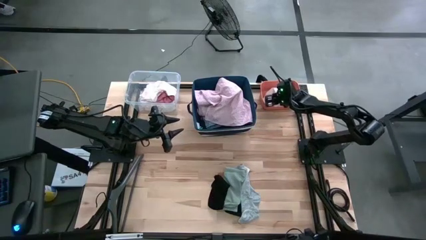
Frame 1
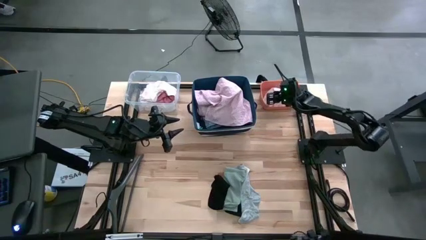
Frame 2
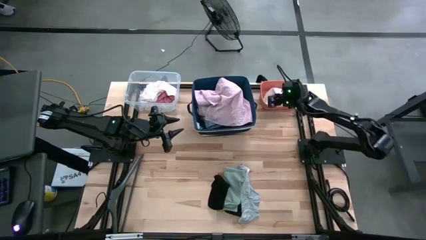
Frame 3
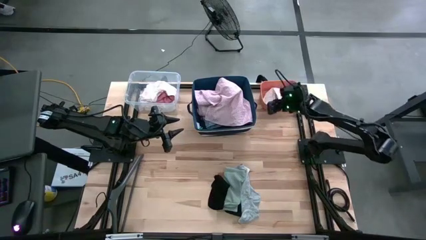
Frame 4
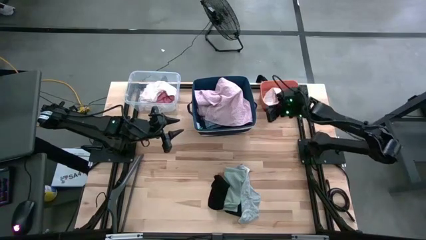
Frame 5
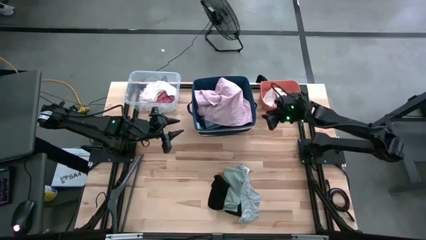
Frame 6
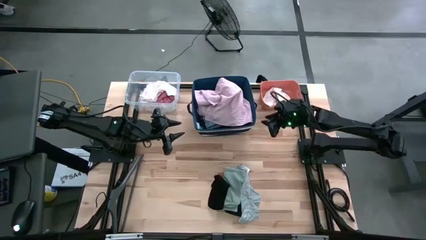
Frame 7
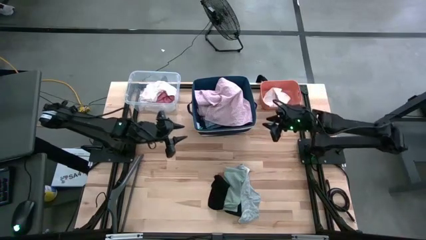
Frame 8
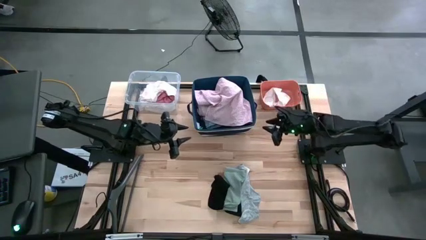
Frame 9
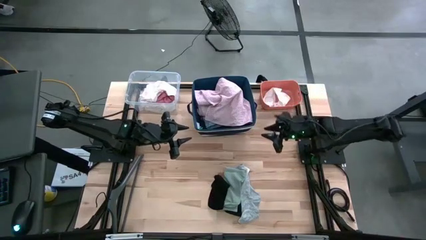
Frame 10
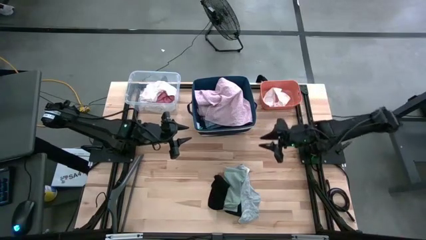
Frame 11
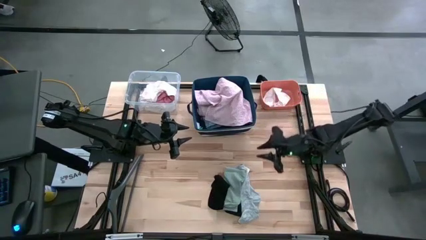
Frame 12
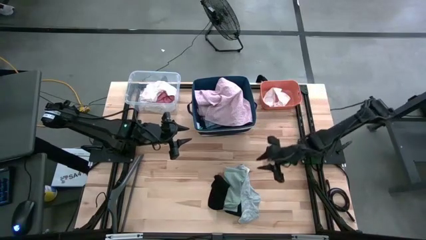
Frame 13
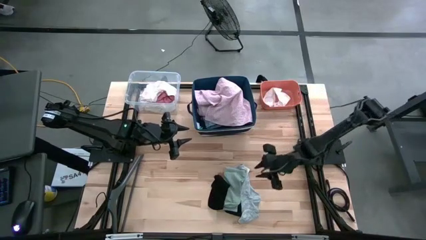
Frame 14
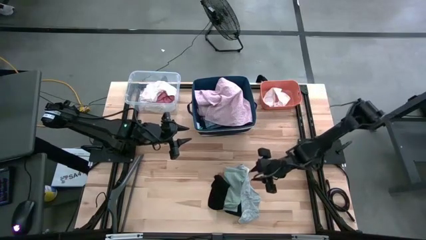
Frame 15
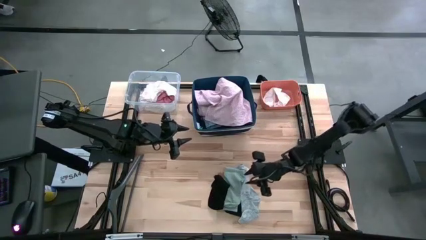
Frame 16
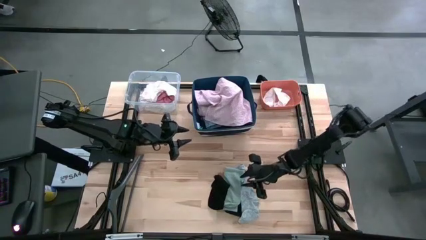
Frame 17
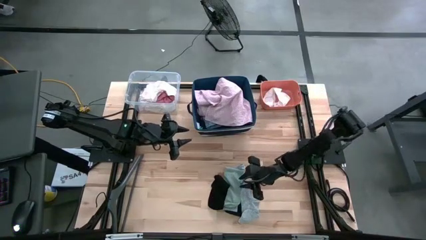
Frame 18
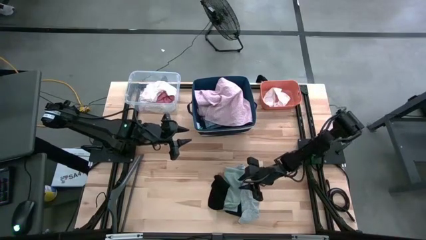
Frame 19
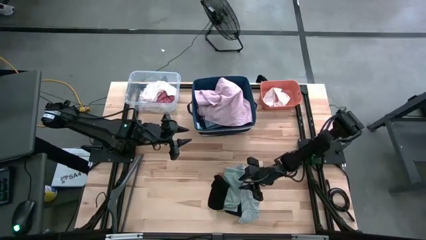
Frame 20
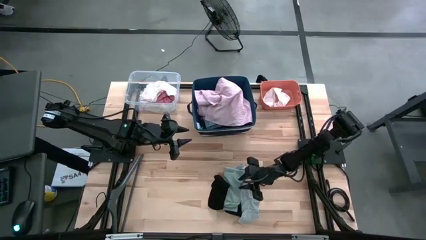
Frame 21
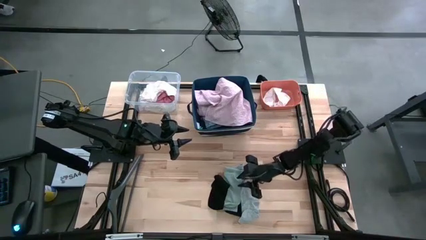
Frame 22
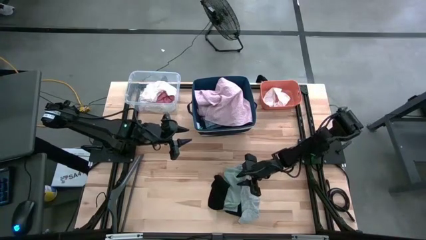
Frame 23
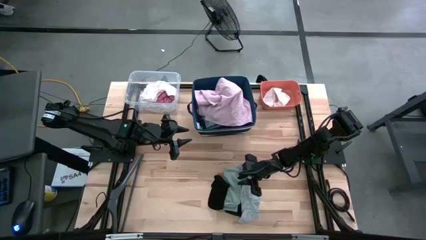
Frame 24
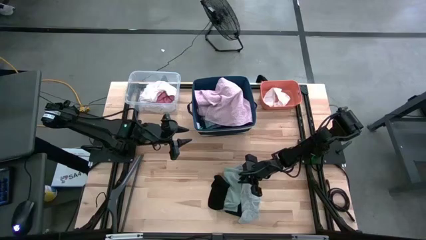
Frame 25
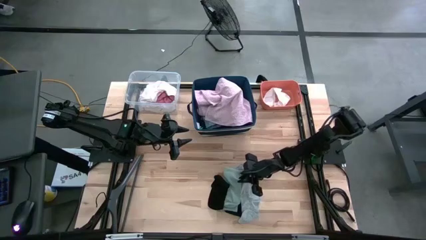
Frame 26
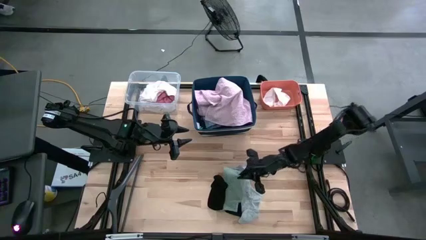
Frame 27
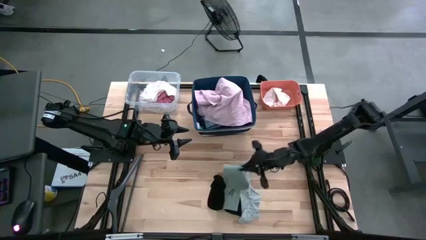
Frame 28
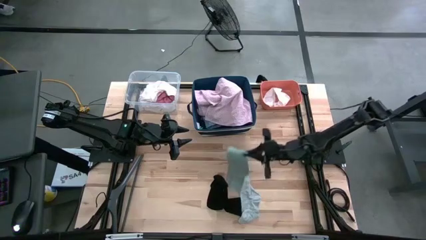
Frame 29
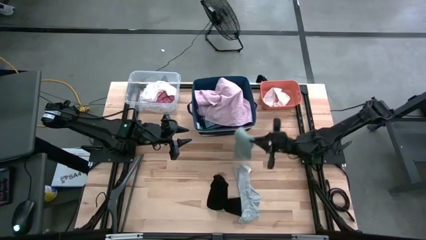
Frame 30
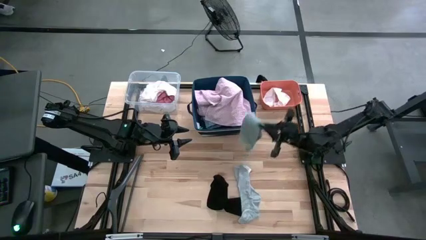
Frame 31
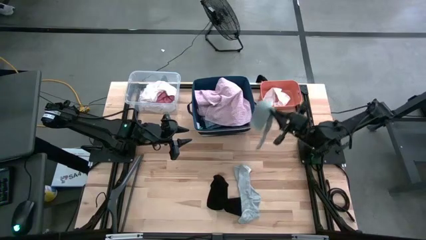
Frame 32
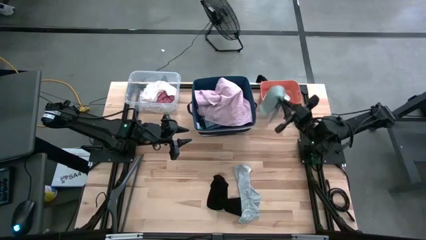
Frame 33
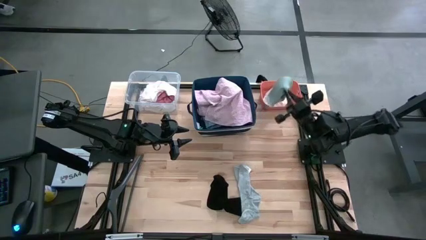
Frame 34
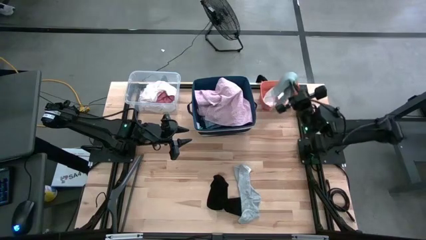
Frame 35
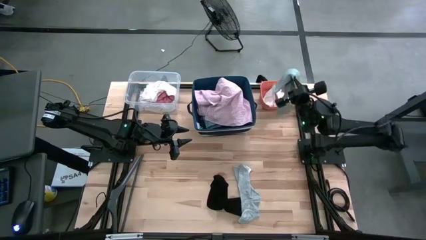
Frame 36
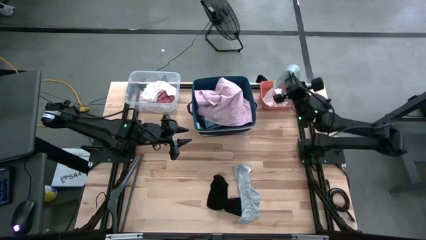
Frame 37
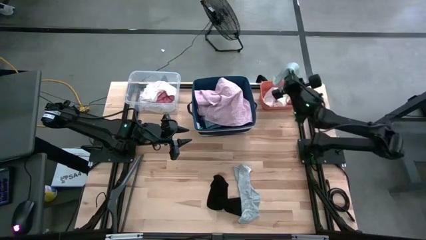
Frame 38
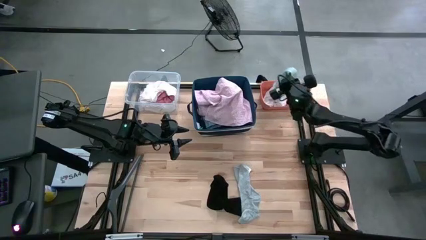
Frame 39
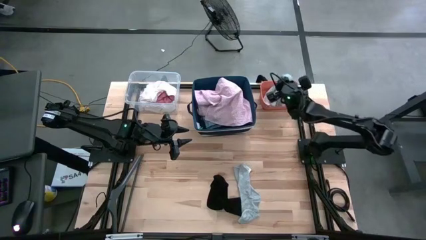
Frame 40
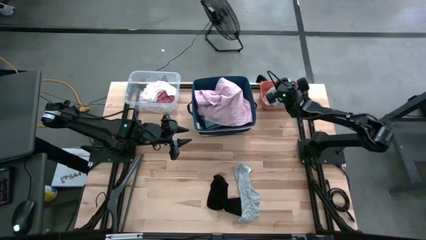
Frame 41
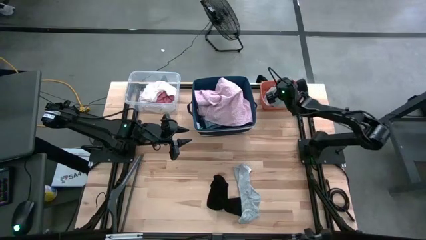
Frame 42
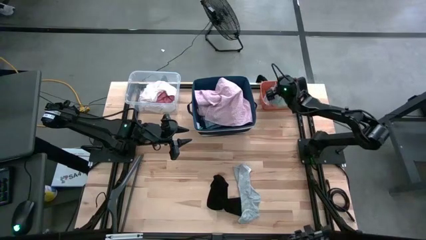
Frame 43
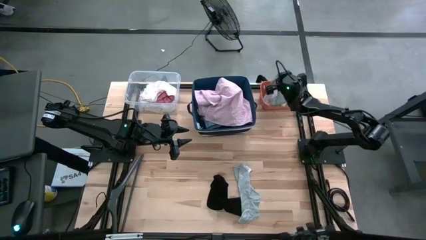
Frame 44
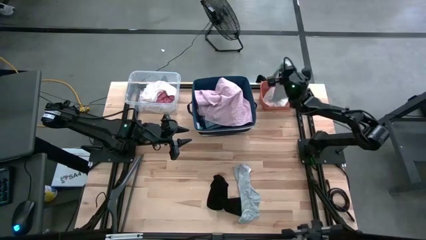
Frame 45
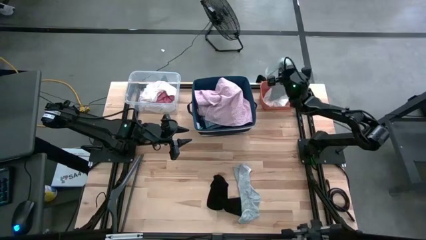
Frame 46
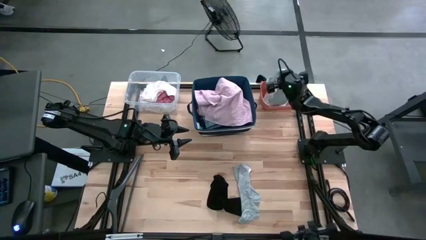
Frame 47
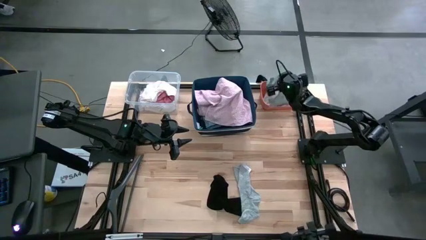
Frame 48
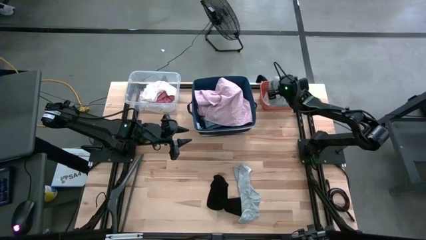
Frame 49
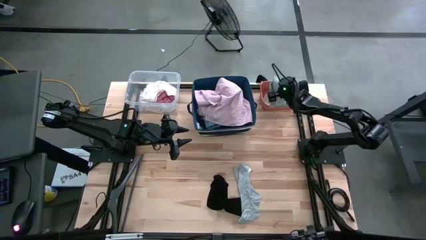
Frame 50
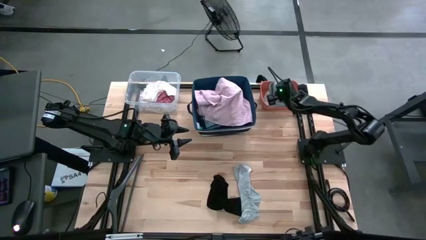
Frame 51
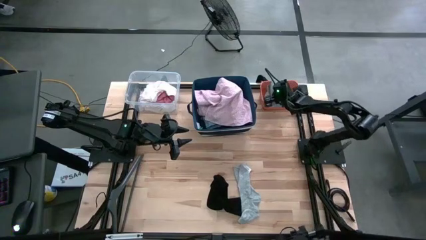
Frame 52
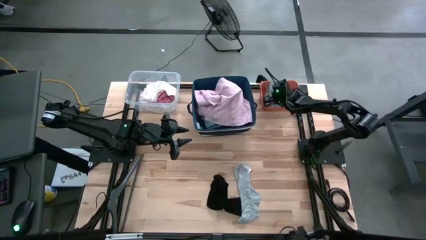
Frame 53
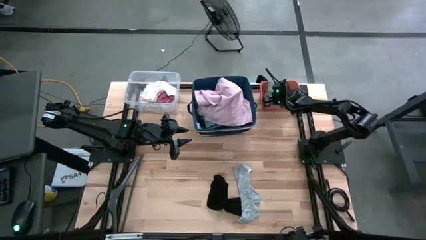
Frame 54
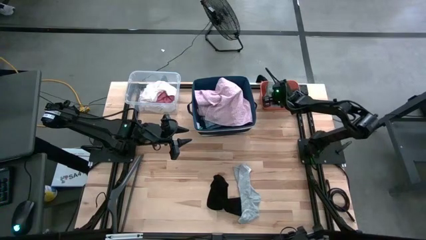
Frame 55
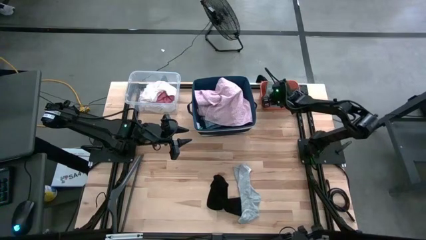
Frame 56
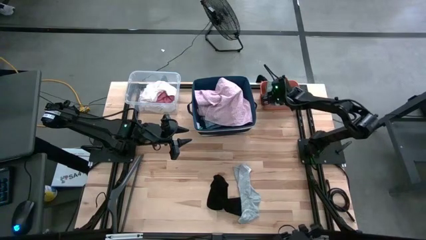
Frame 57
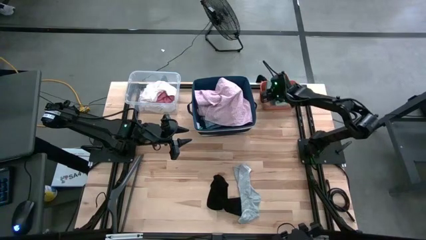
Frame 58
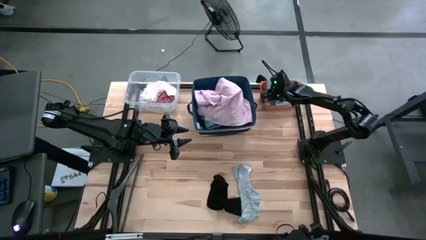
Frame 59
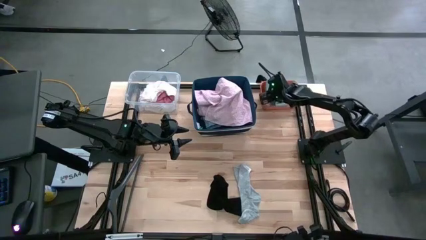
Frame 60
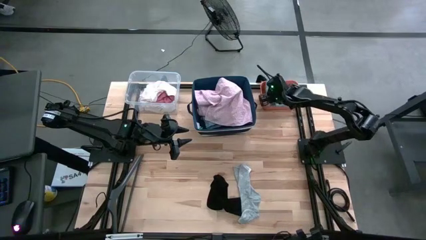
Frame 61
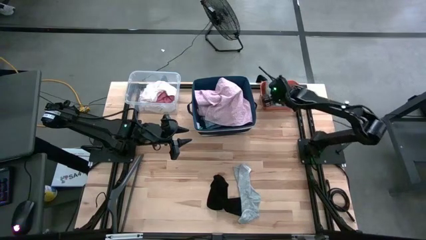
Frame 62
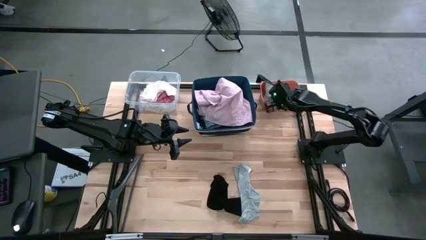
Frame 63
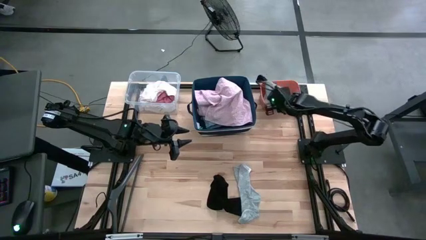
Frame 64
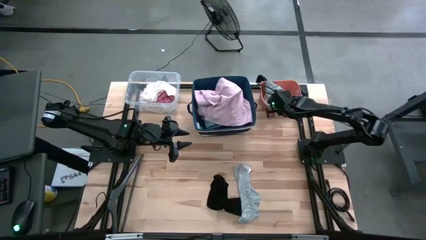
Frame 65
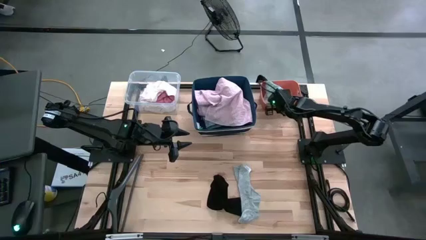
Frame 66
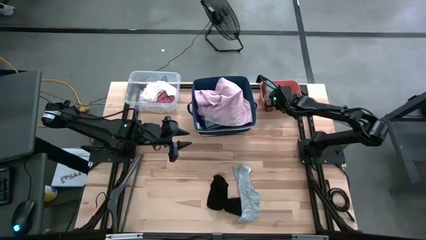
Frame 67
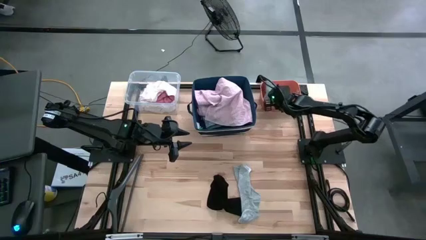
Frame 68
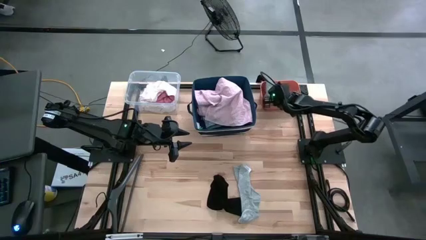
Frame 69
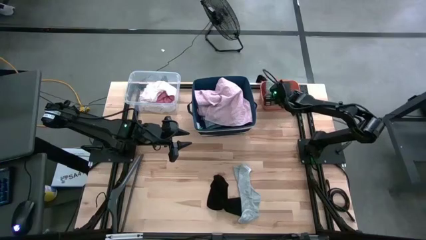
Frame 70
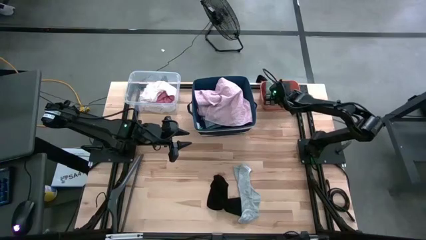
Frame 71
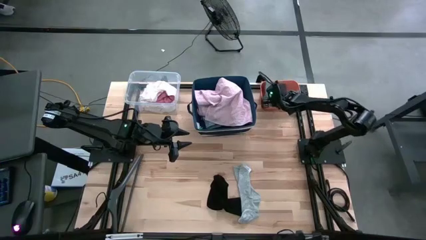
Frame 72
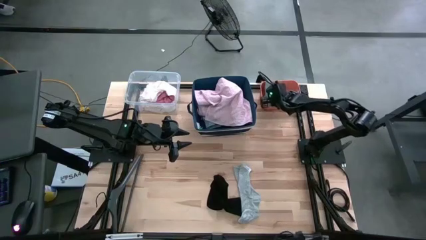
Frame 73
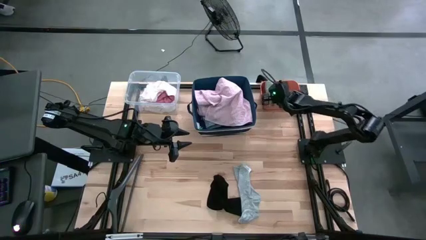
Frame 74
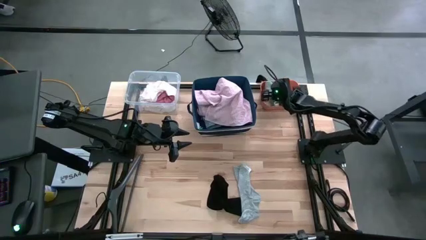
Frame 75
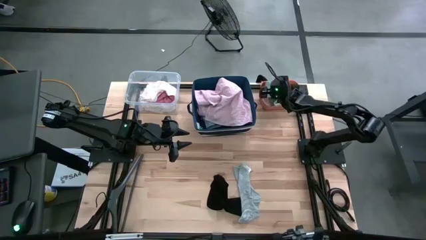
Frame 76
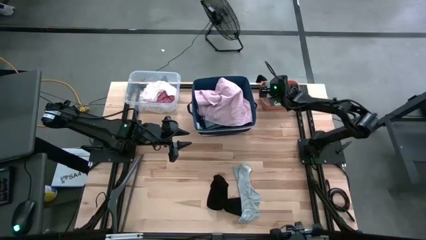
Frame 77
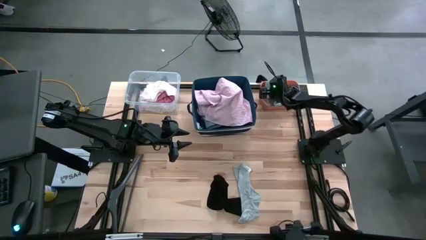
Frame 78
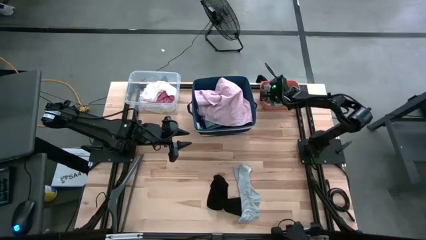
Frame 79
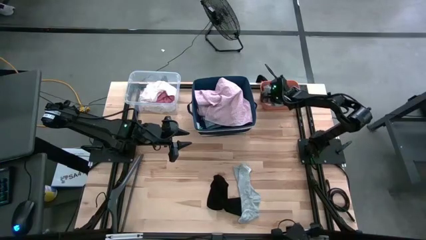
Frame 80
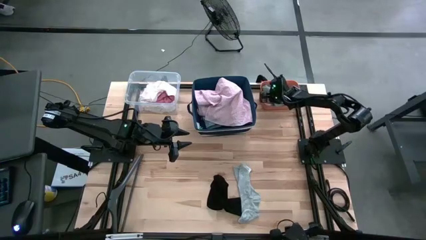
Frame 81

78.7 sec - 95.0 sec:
Task: Pick & Place Cloths
Put the dark gray sock into the orange bin
